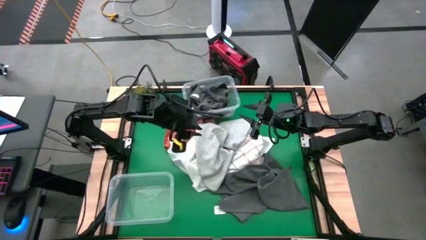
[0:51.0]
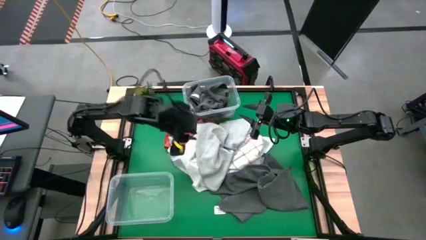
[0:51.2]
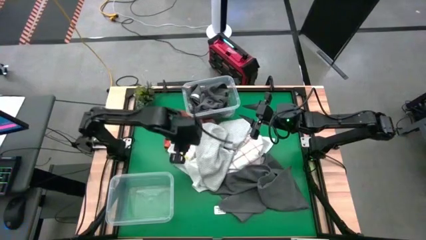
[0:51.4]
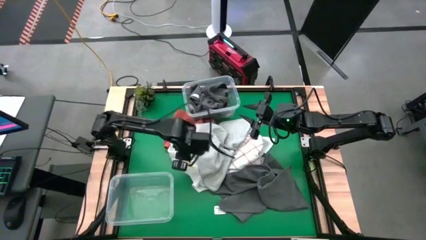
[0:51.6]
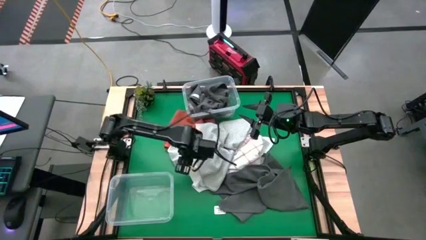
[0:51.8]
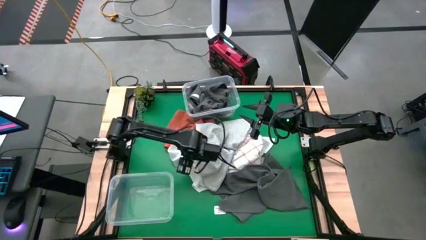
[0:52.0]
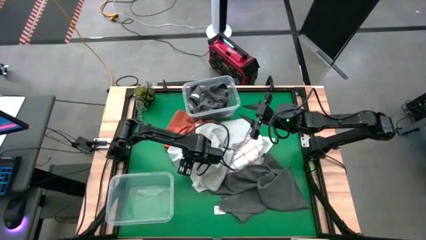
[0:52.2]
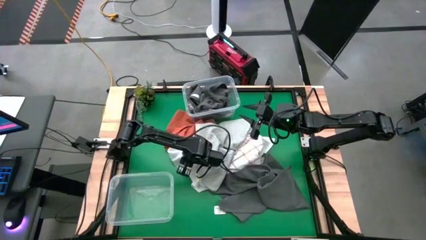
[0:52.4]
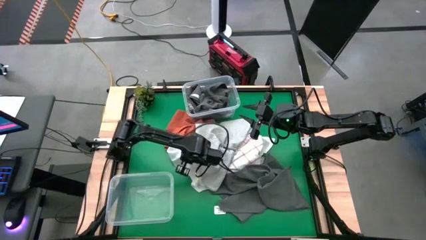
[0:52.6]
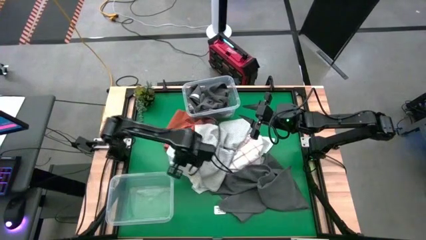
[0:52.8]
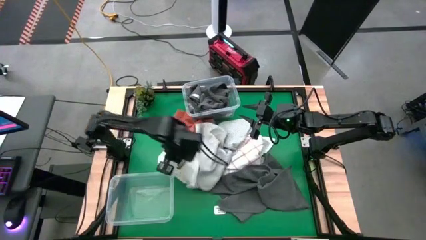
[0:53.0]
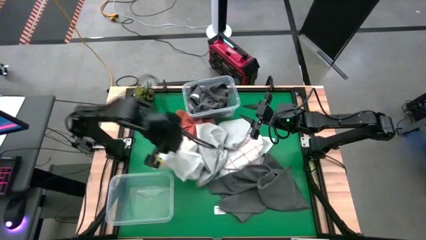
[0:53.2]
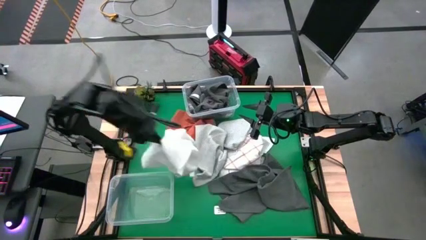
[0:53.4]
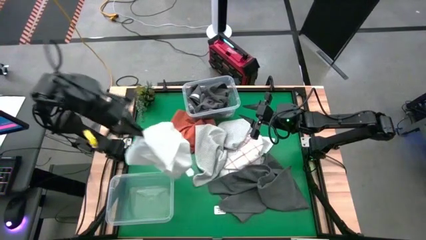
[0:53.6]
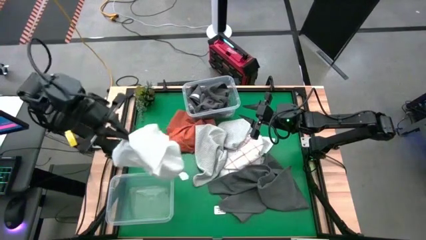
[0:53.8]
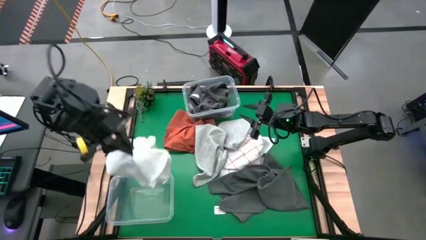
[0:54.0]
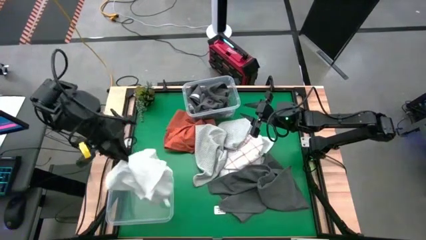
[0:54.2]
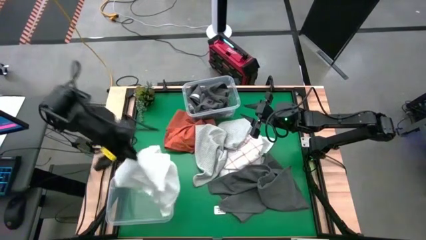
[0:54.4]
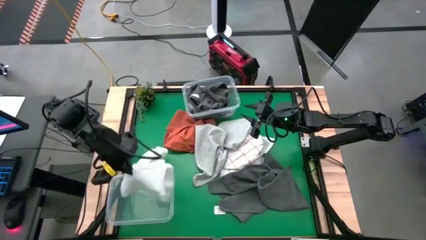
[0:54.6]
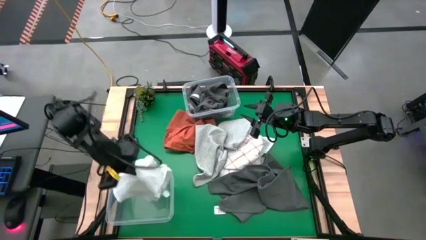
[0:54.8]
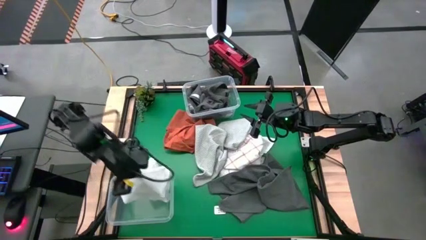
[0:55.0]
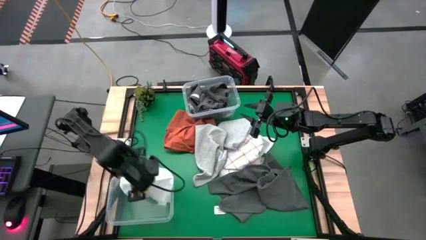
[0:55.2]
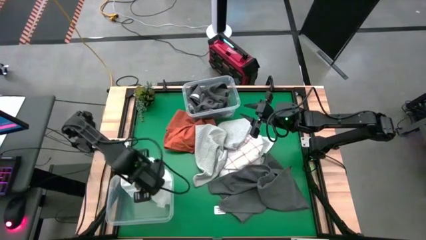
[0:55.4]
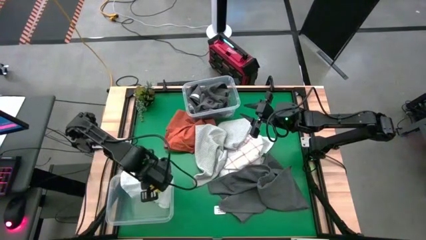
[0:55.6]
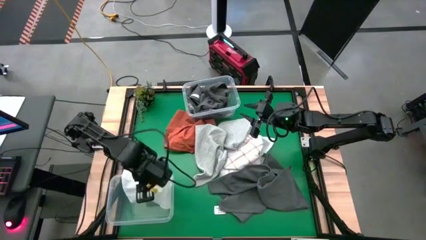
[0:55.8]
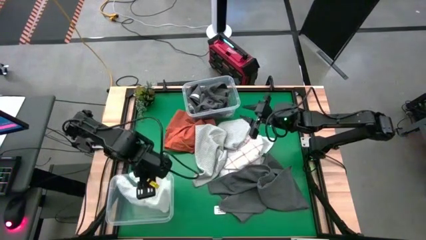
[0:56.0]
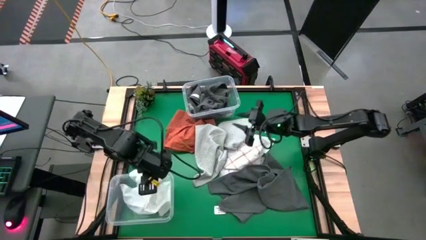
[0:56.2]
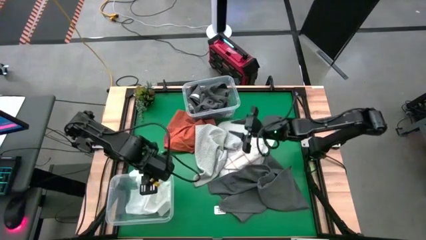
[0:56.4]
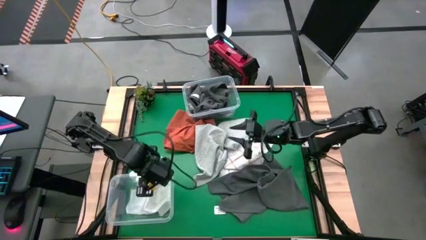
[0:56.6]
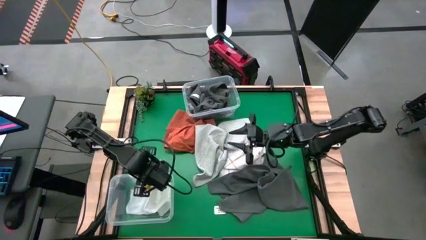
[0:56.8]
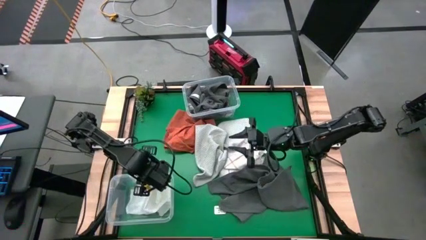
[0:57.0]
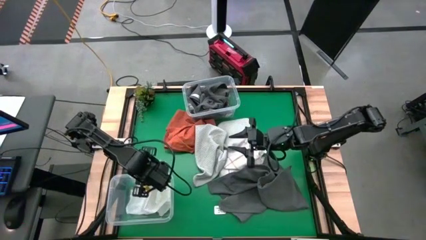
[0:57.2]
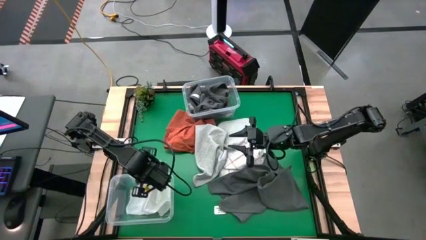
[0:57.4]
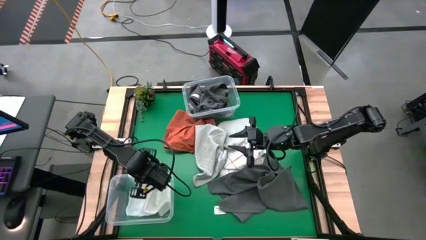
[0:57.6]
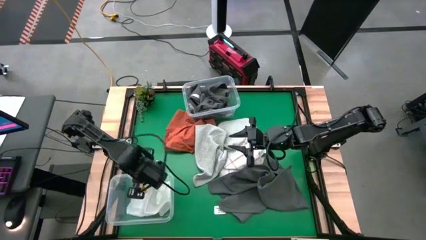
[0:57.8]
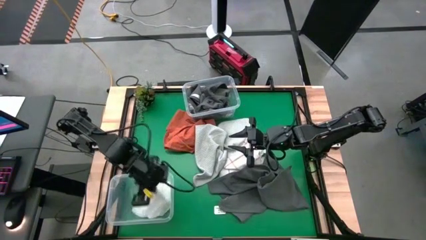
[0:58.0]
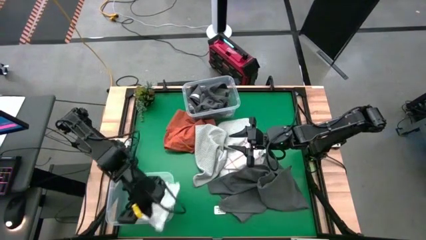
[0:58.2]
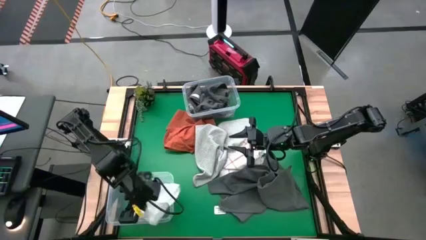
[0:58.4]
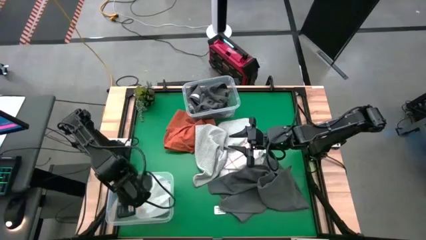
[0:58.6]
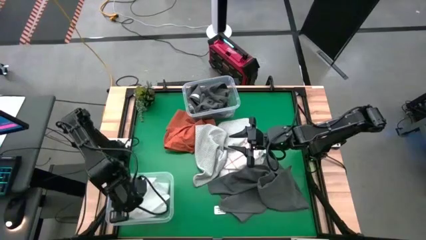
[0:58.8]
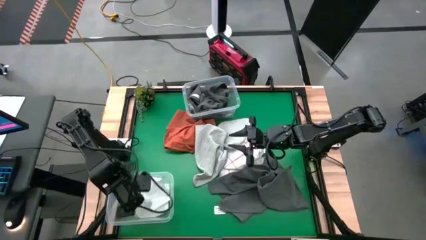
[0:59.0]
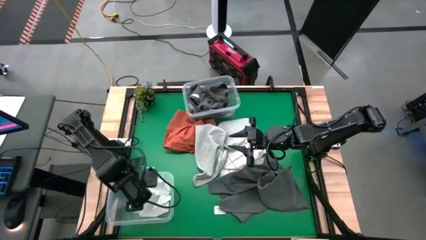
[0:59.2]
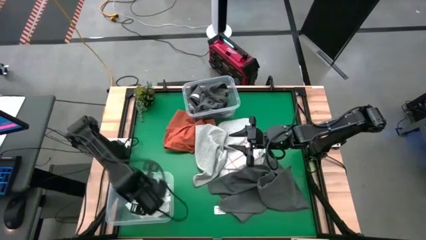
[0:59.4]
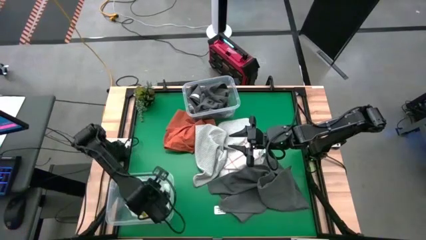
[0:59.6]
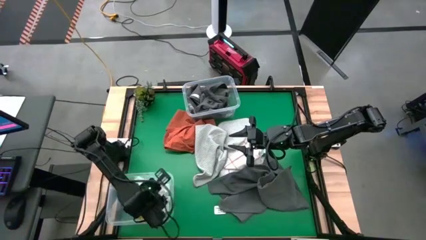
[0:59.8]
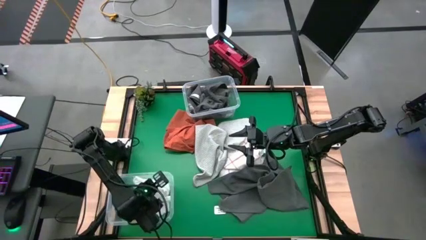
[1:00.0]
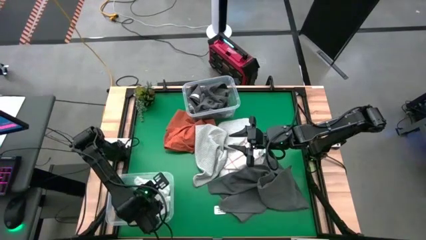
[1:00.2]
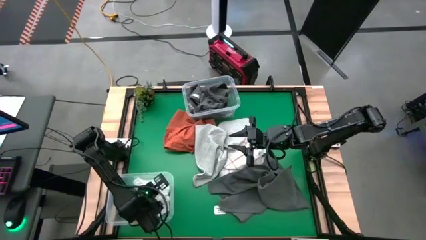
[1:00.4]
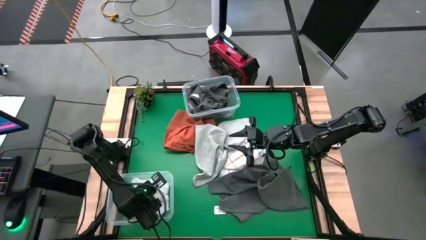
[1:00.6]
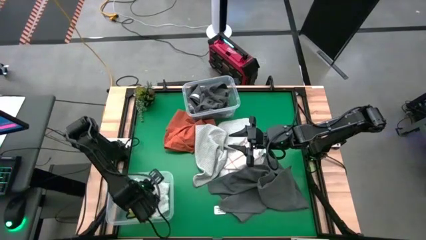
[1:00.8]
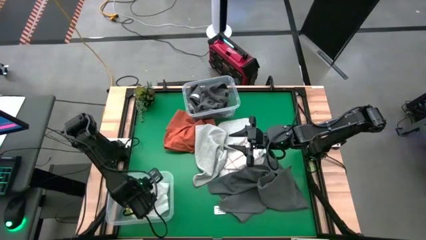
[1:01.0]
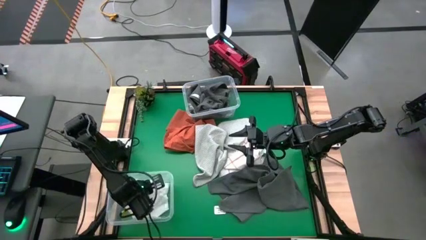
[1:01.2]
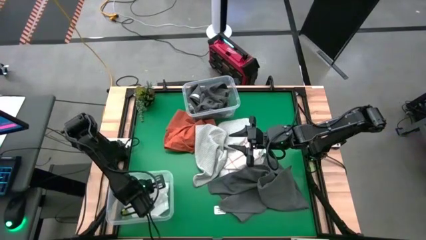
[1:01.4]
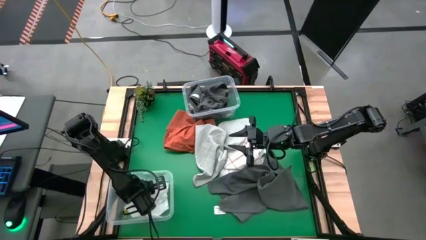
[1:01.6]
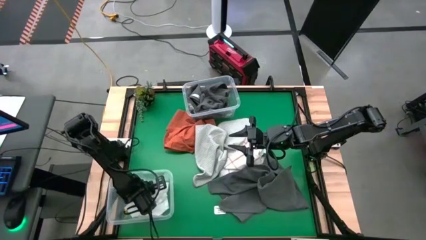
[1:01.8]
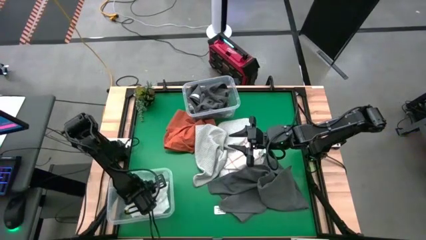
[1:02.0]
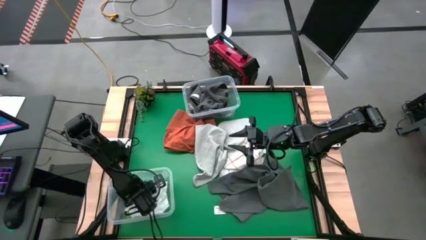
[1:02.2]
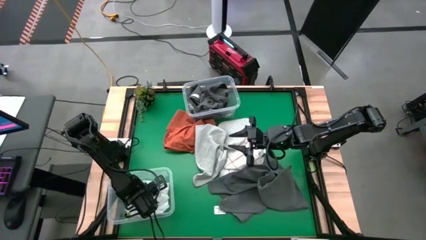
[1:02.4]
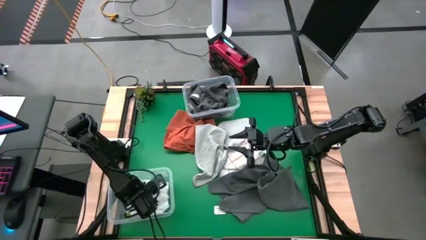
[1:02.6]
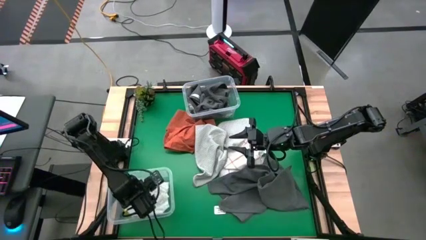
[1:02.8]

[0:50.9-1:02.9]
Task: Sort towels by color in basket
Put the left white towel into the bottom transparent bin

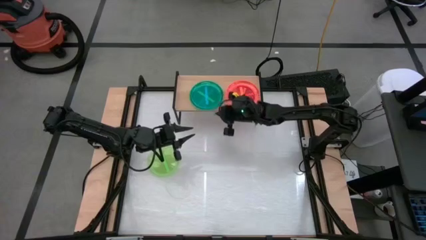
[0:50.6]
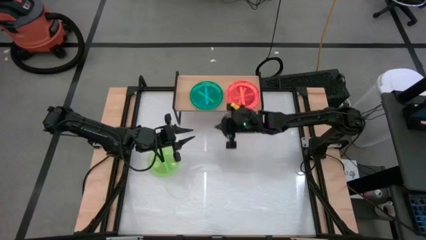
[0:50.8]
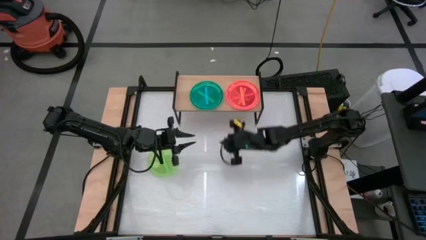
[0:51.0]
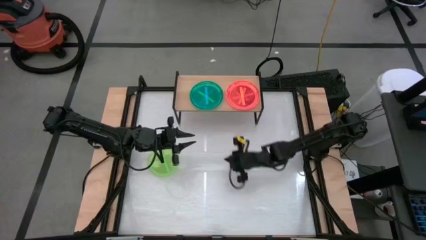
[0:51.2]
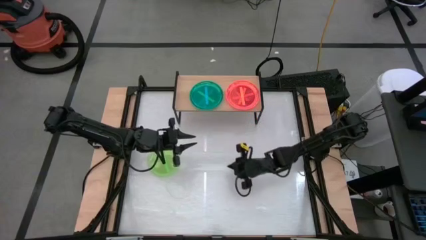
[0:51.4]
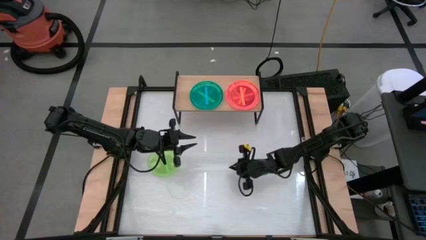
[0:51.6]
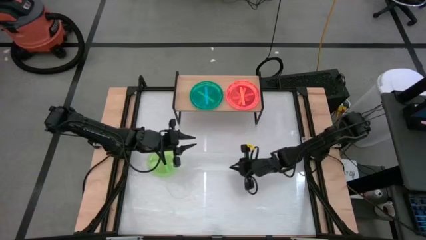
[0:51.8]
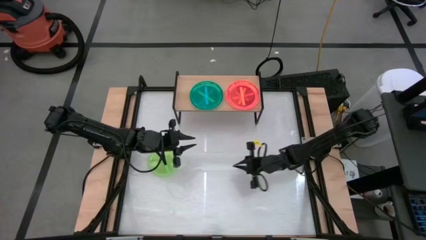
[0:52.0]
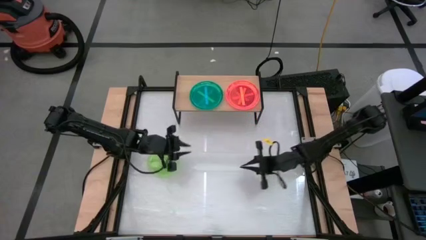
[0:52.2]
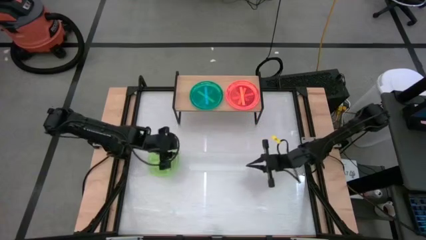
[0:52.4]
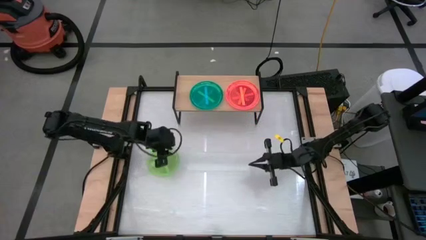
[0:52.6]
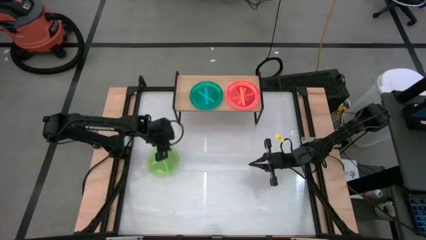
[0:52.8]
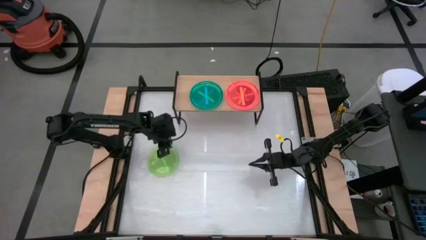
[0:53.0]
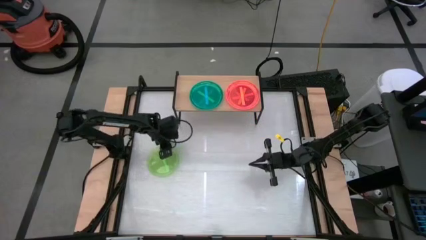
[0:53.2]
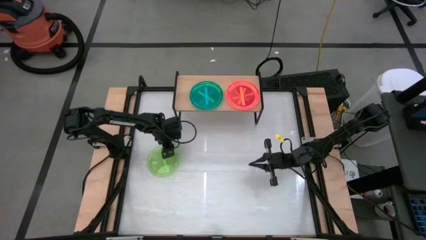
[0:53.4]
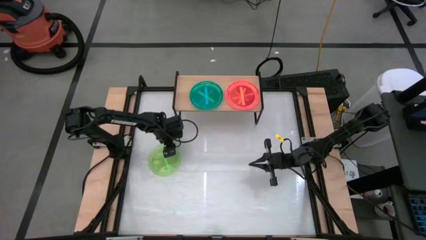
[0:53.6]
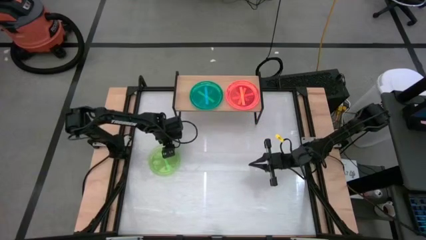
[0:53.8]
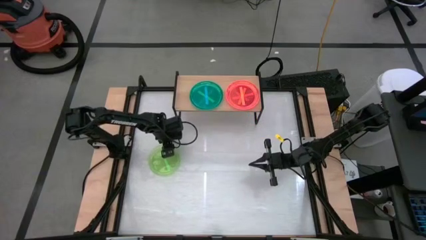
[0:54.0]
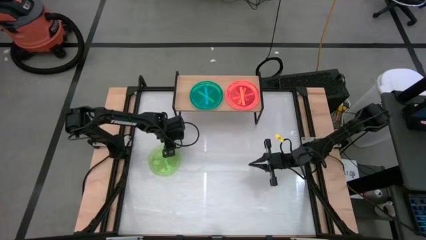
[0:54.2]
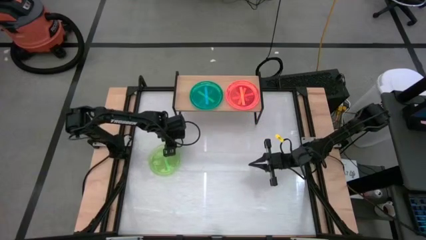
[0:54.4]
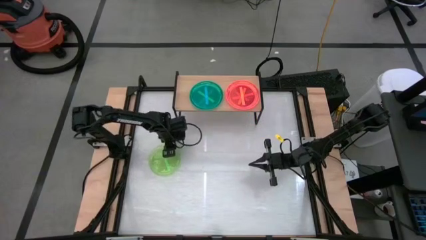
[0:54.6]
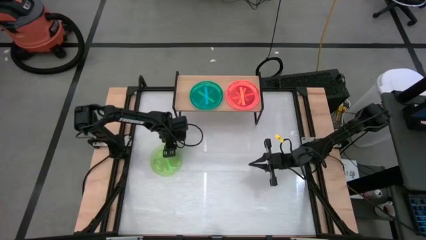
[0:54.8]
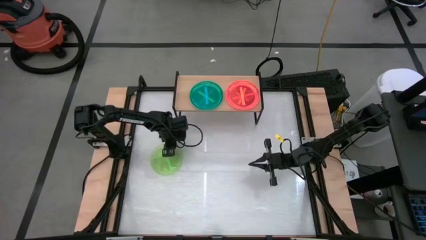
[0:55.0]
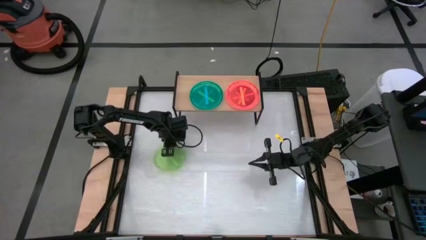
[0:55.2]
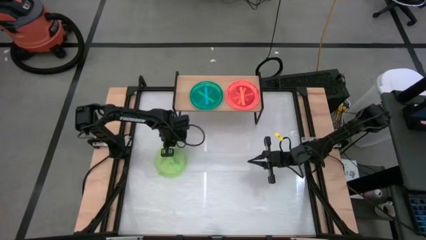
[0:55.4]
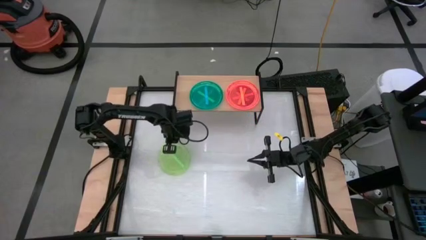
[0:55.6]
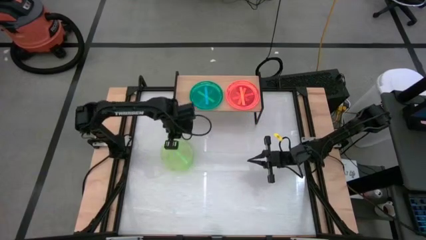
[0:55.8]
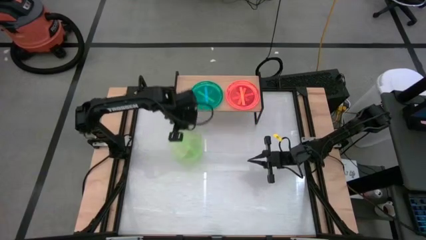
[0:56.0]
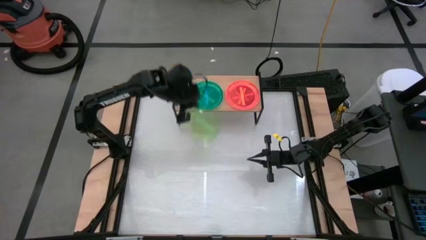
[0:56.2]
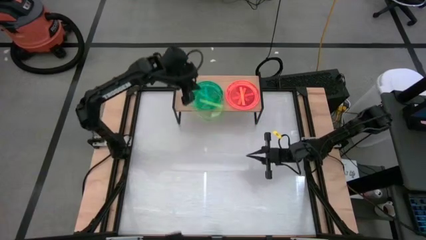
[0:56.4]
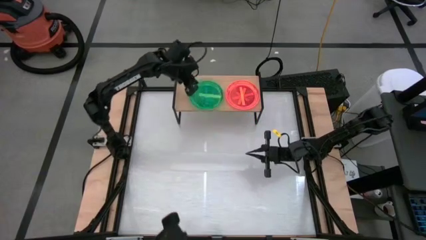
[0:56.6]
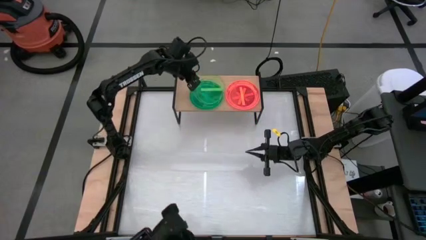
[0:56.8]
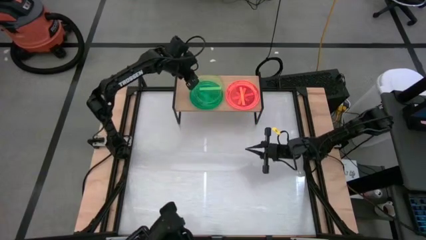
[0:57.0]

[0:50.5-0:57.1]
Task: Place and stack plates onto a shelf
Stack the green plate on top of the blue plate on the shelf
